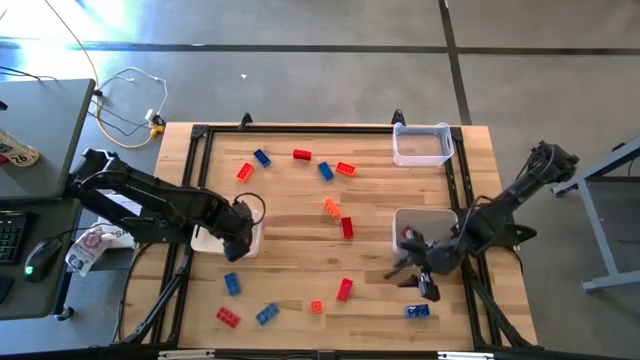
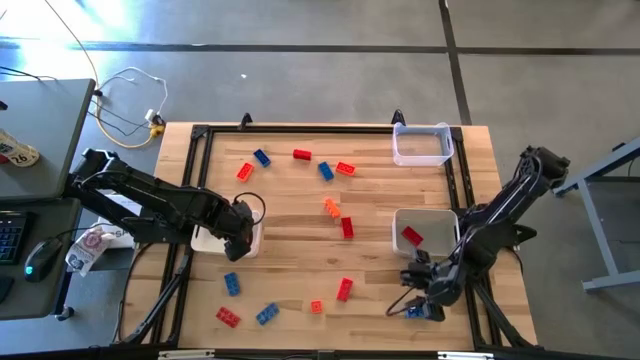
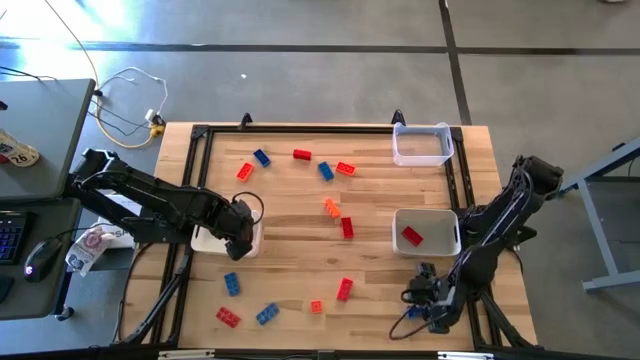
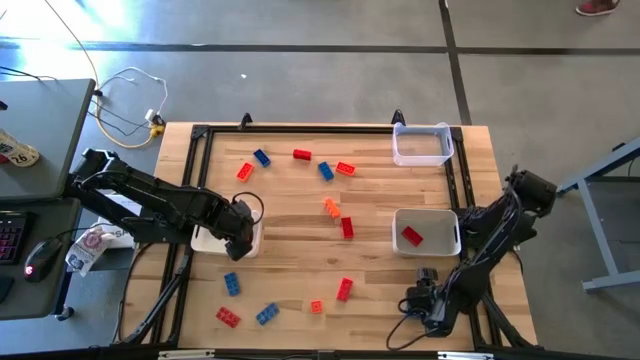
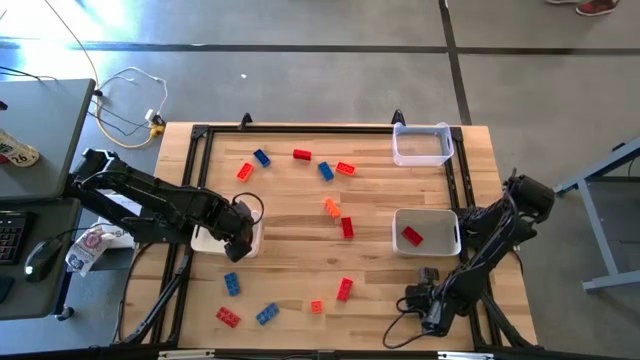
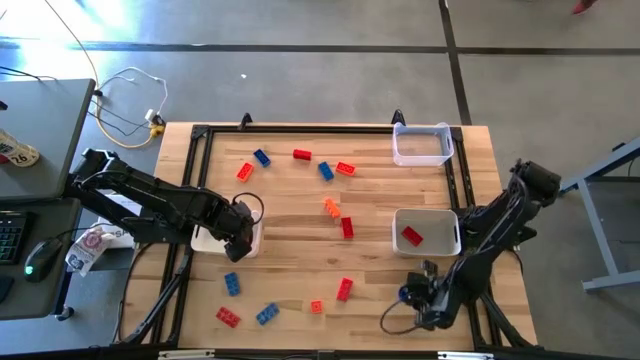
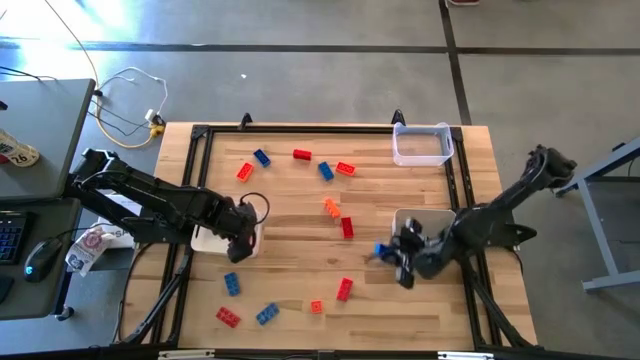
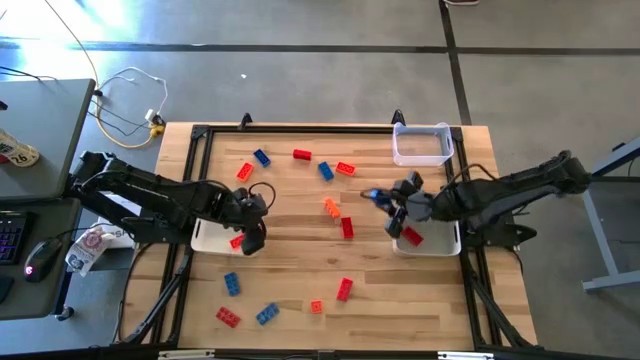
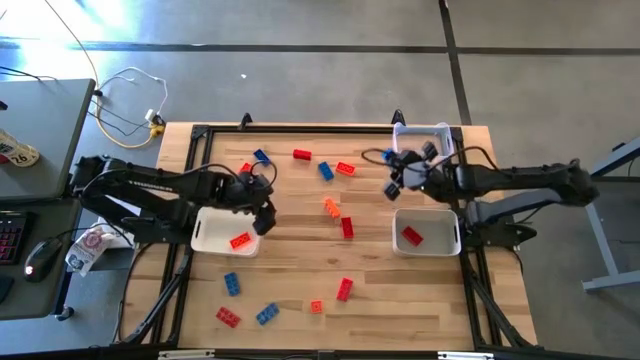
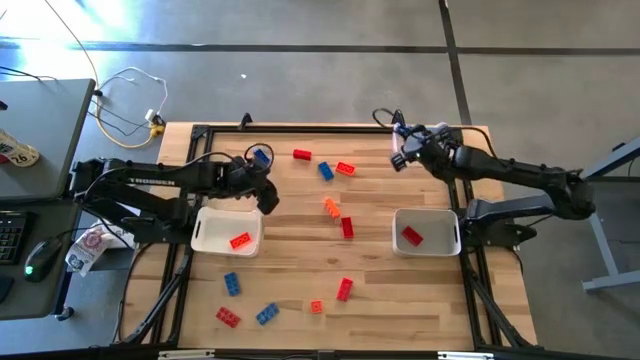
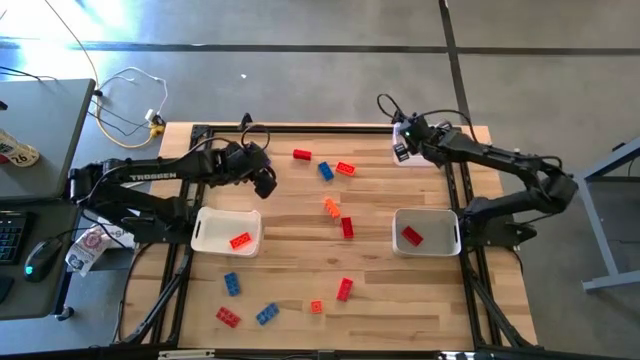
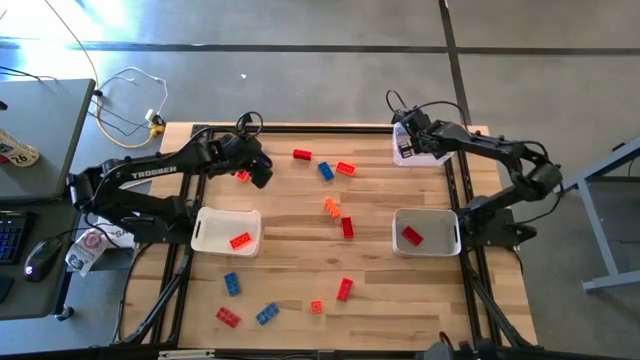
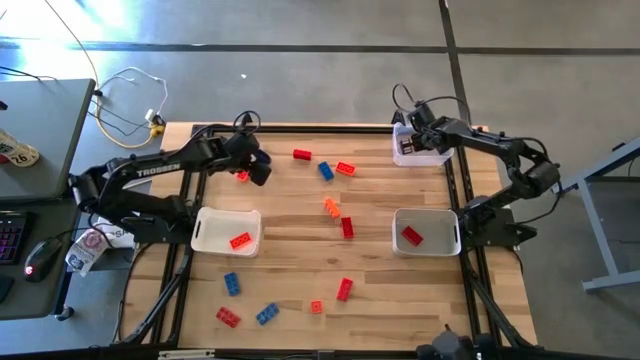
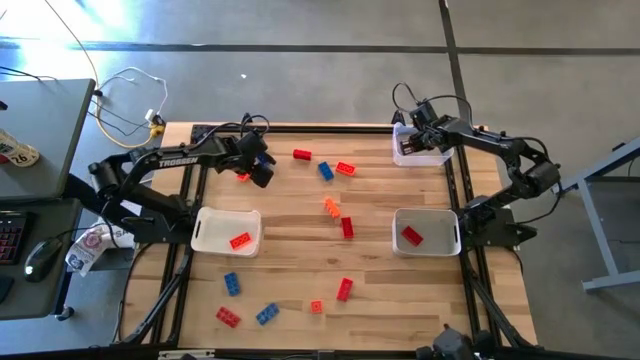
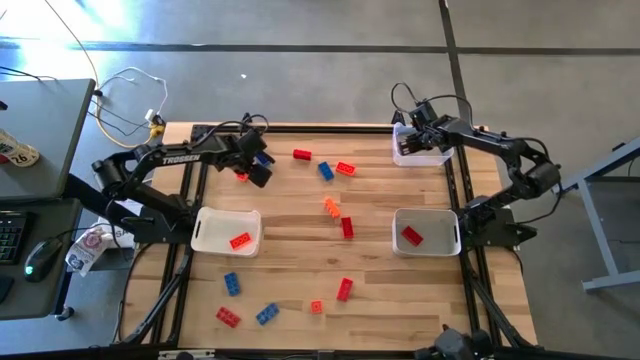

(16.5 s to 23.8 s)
Task: Sort & place blocks by color
Put the blue game piece into the transparent bin

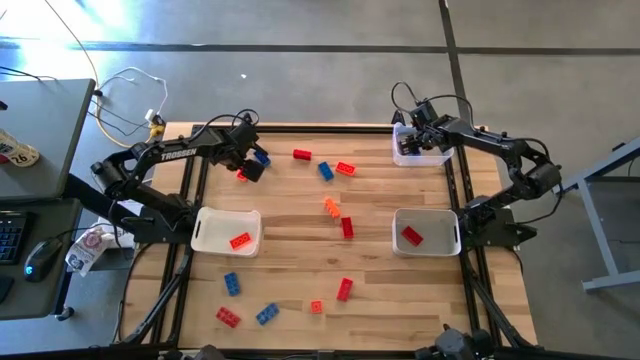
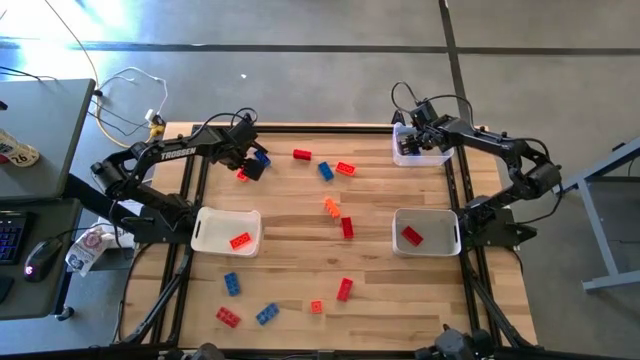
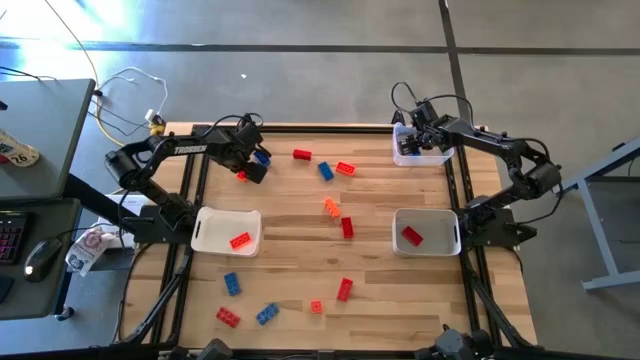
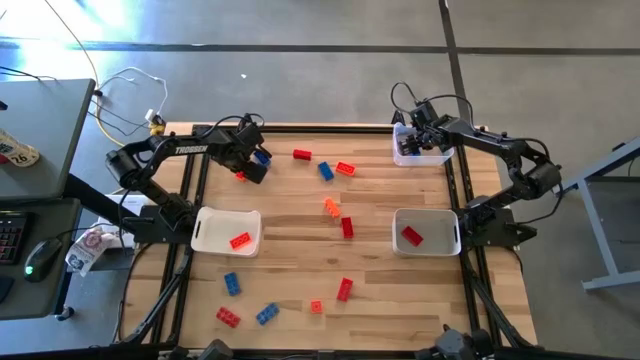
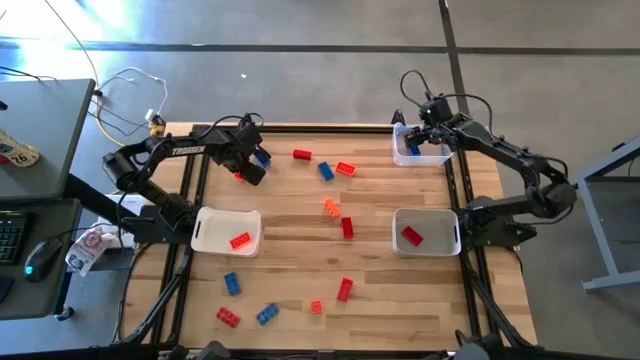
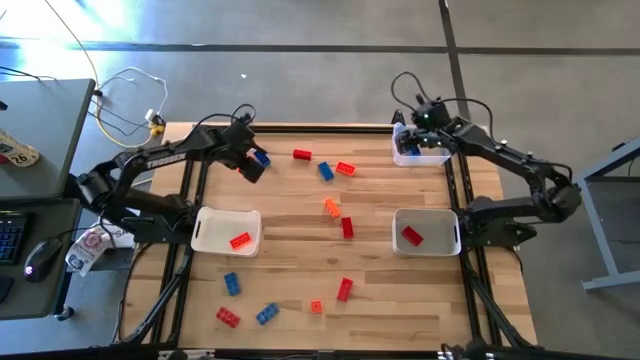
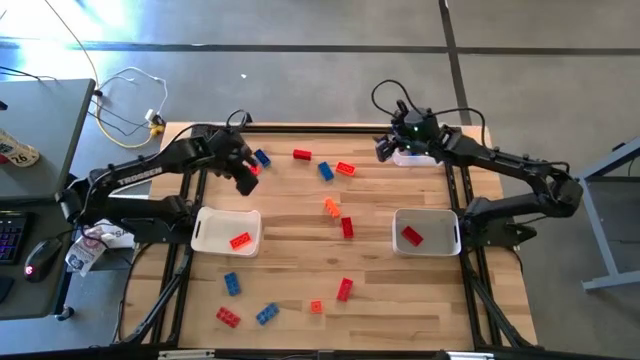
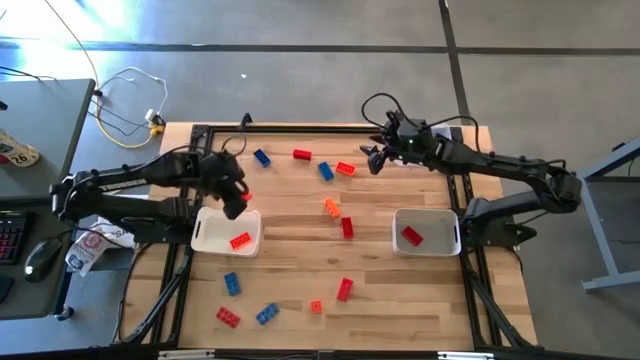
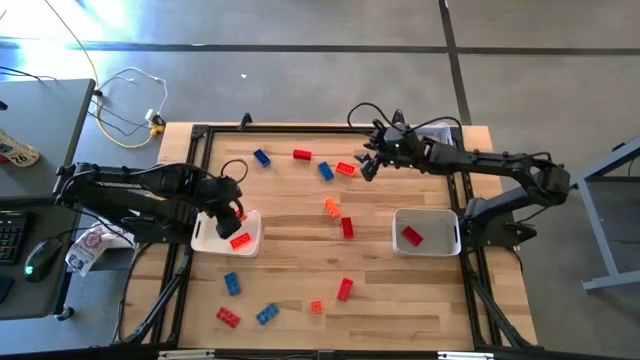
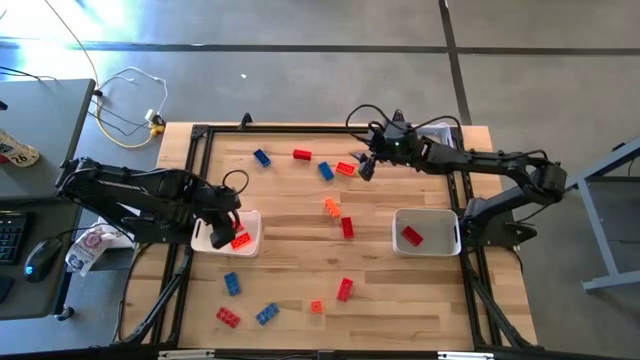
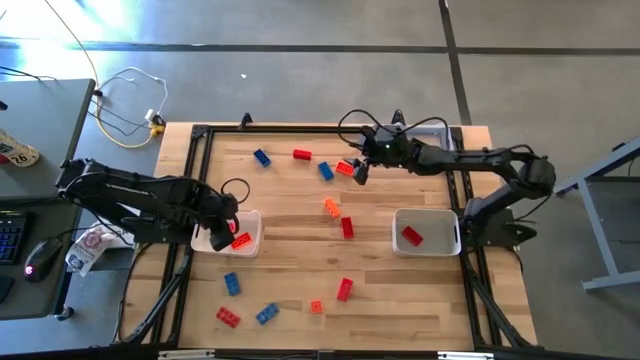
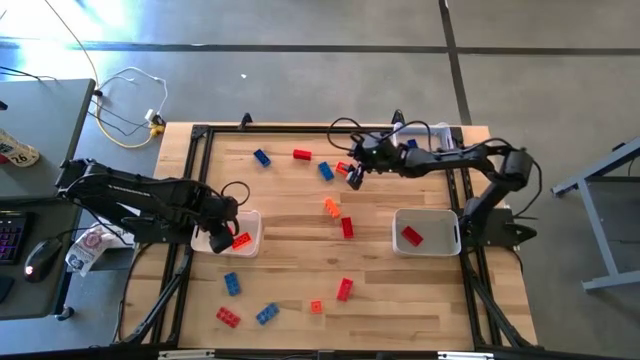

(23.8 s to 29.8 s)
Put the orange game piece into the white bin

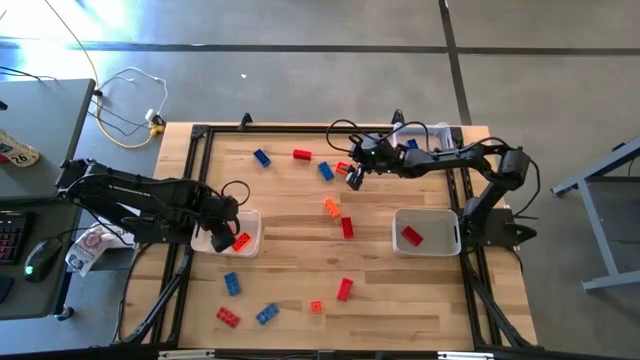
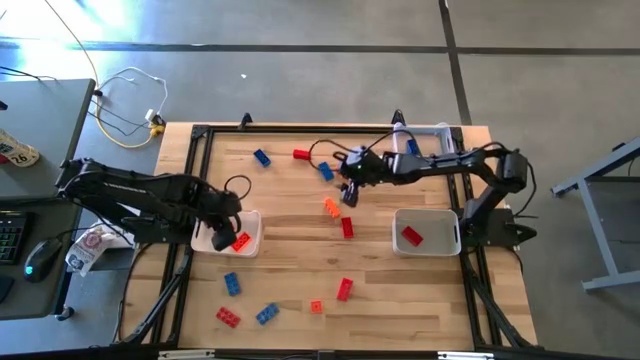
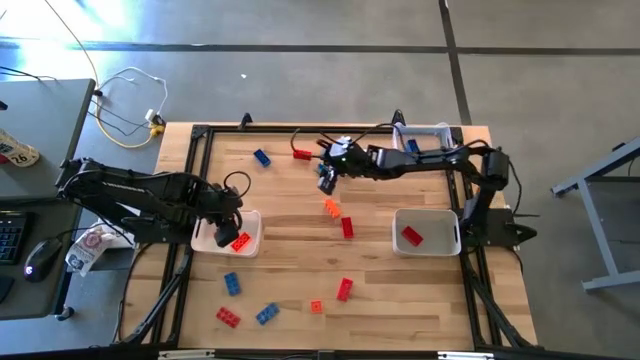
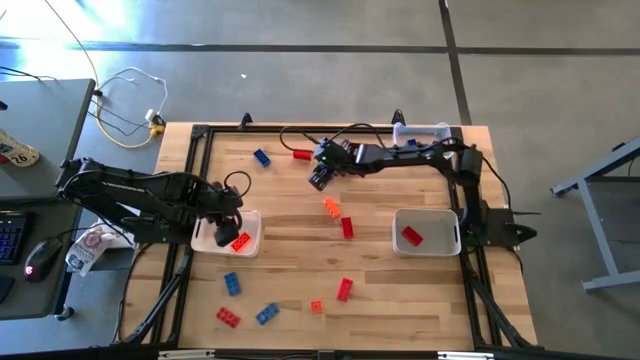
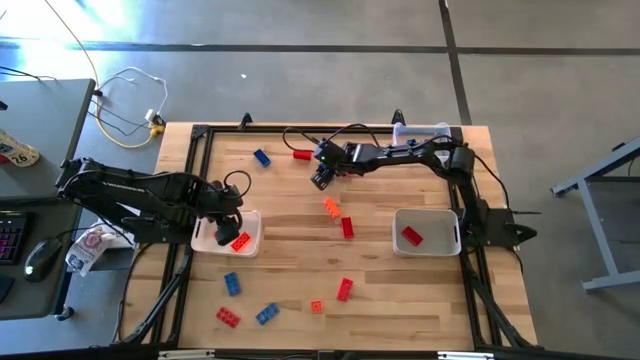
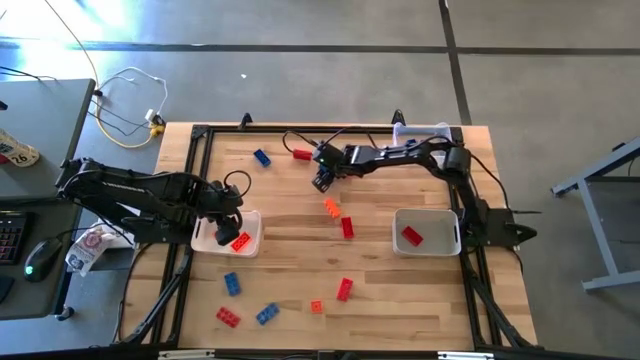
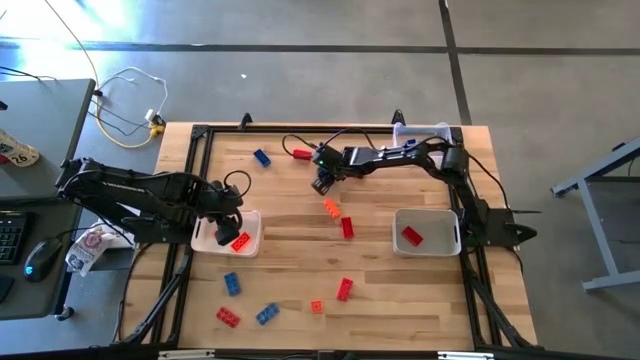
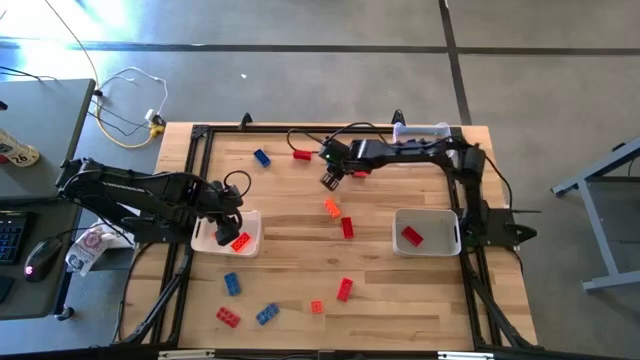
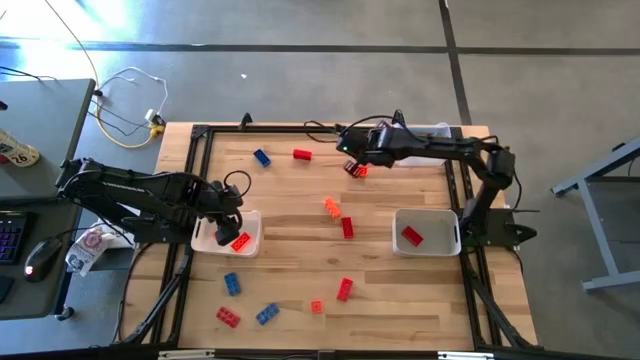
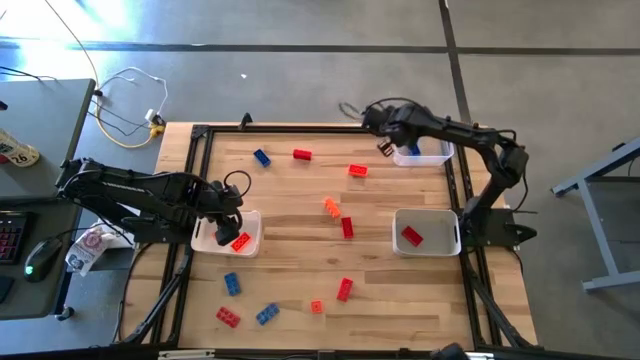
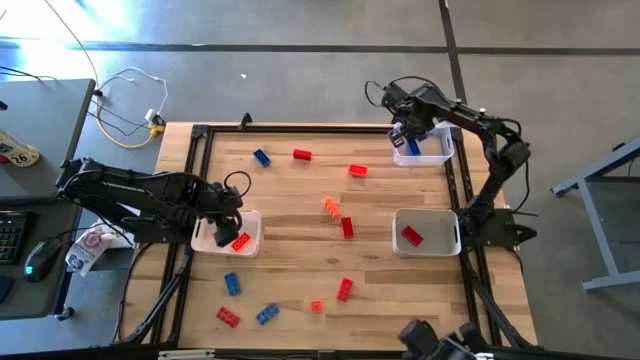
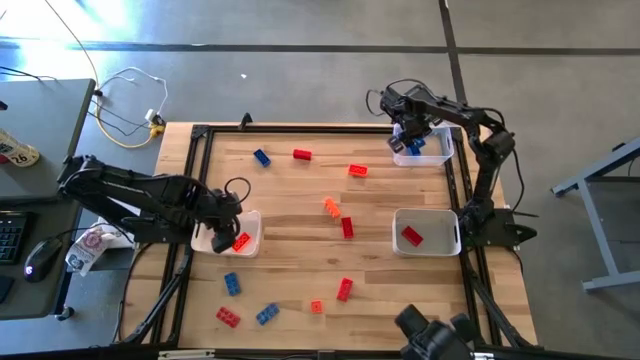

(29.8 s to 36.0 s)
Put the blue game piece into the transparent bin

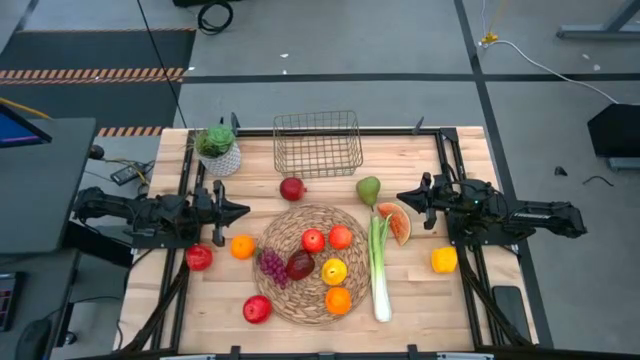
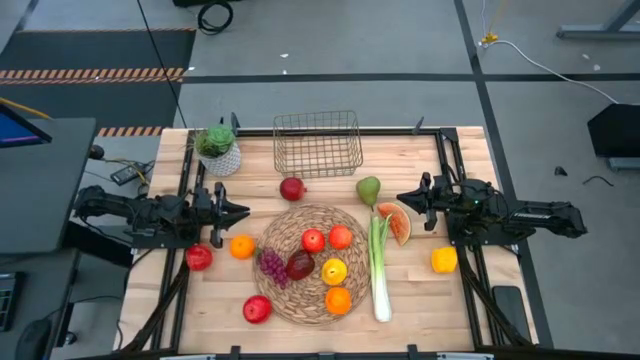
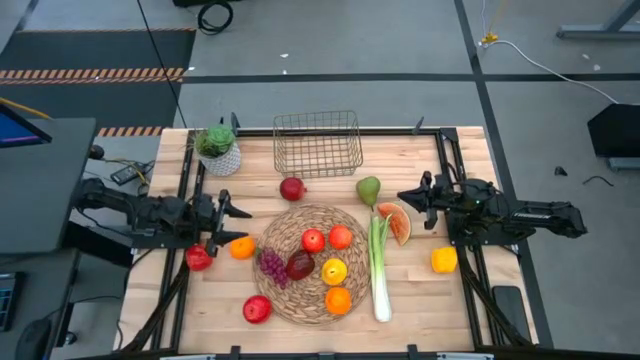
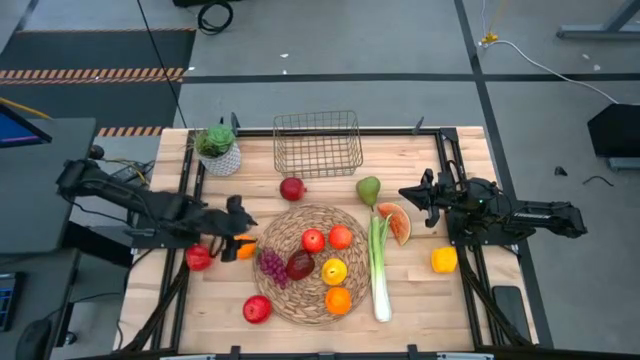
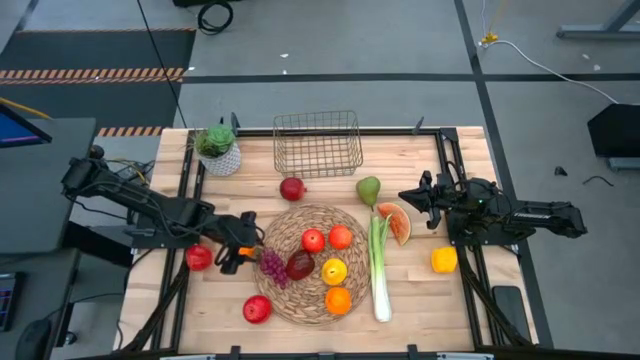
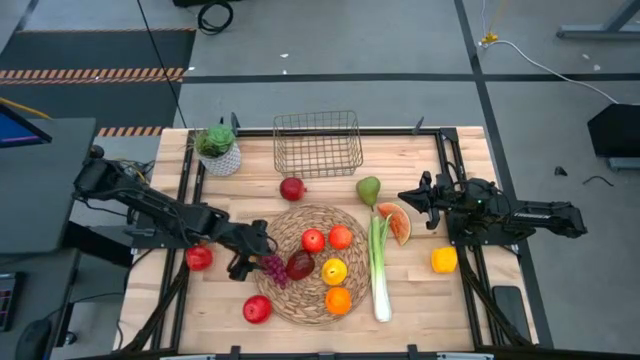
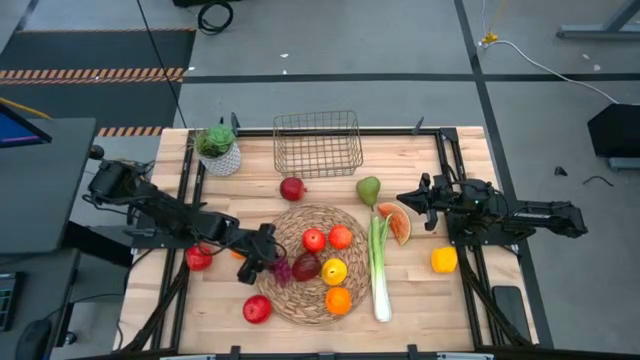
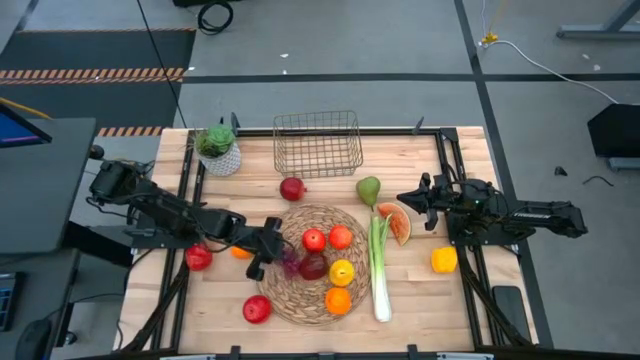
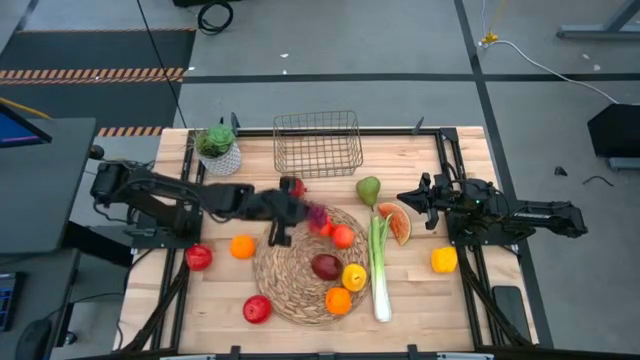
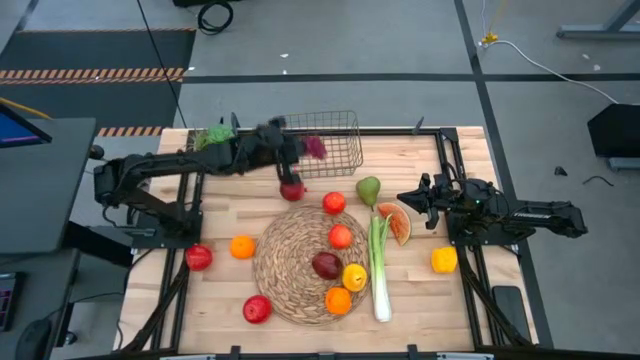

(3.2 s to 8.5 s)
Task: Build produce basket
Put the grapes into the wire basket
